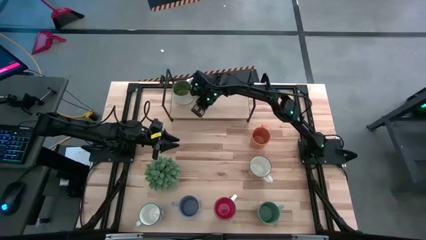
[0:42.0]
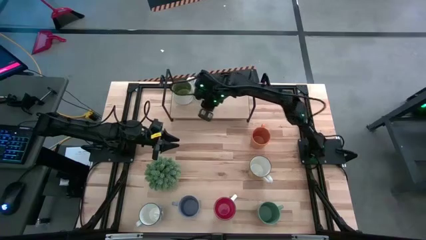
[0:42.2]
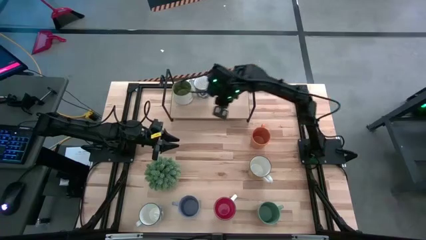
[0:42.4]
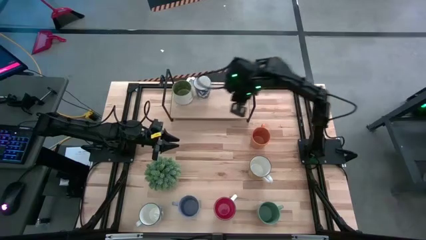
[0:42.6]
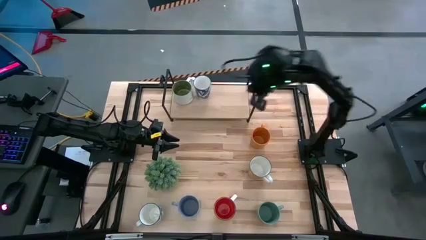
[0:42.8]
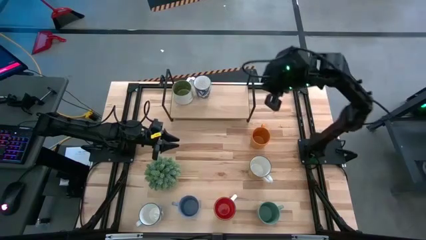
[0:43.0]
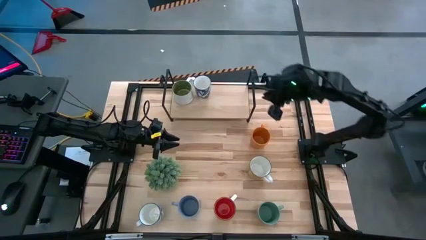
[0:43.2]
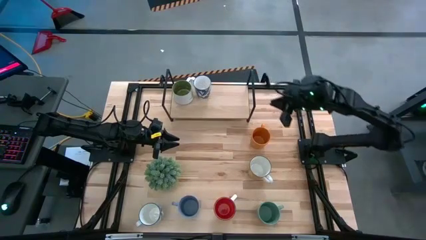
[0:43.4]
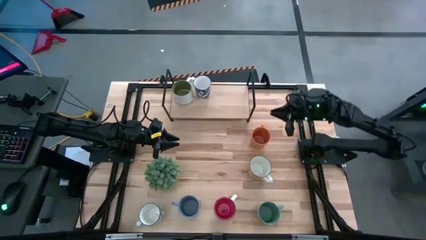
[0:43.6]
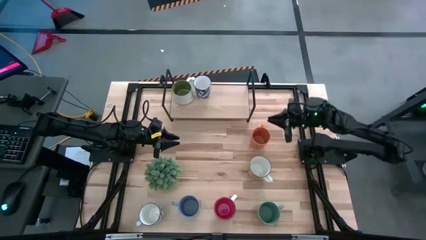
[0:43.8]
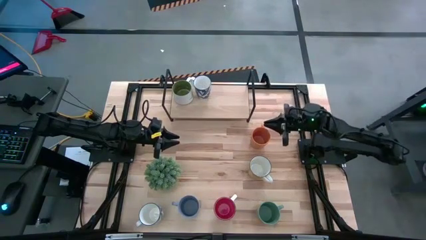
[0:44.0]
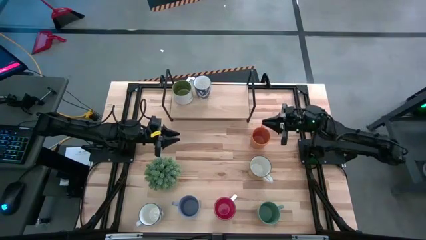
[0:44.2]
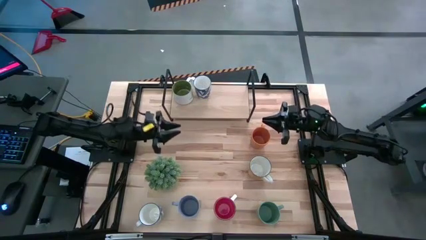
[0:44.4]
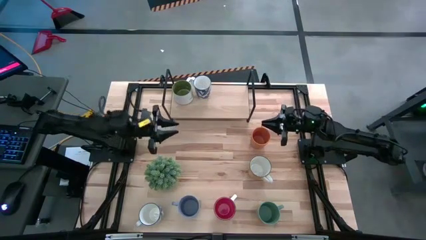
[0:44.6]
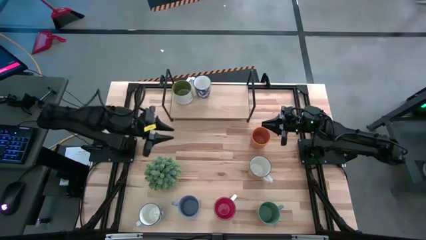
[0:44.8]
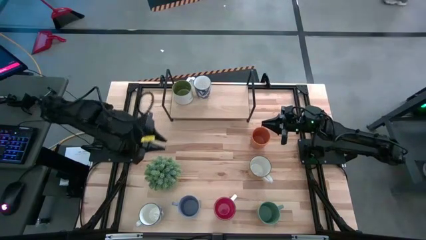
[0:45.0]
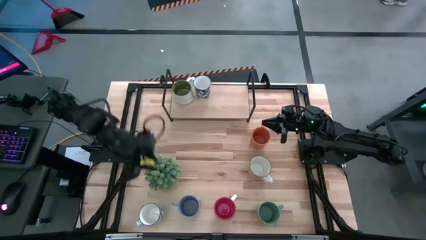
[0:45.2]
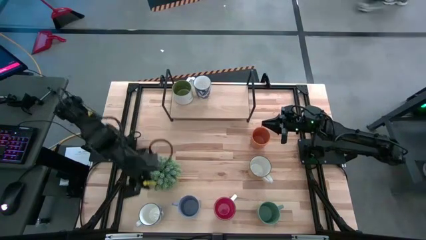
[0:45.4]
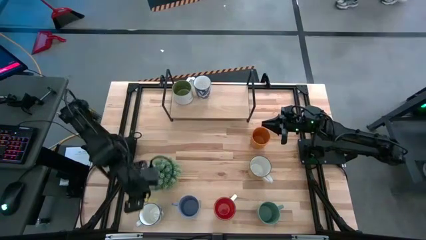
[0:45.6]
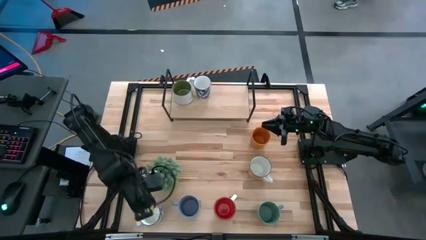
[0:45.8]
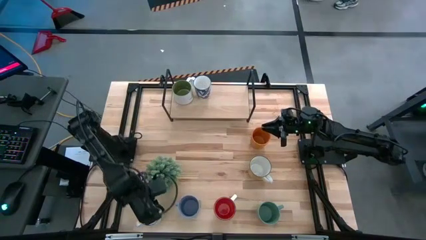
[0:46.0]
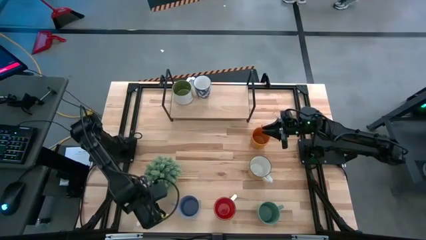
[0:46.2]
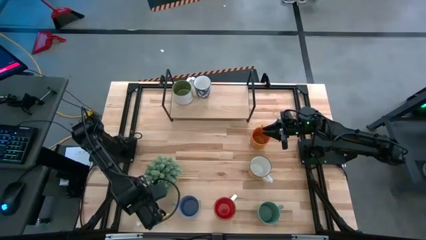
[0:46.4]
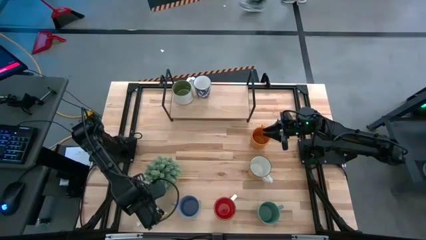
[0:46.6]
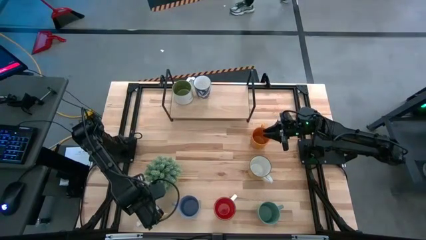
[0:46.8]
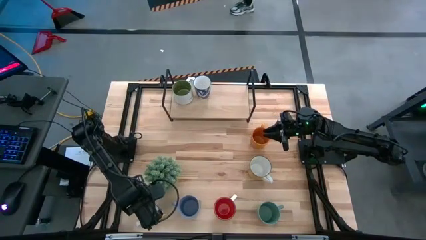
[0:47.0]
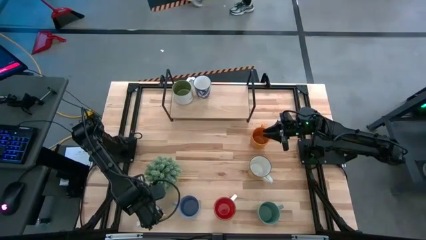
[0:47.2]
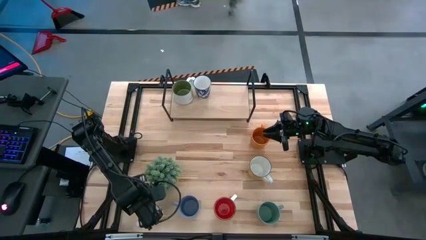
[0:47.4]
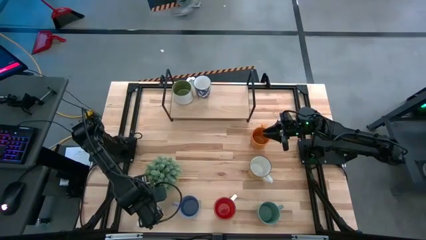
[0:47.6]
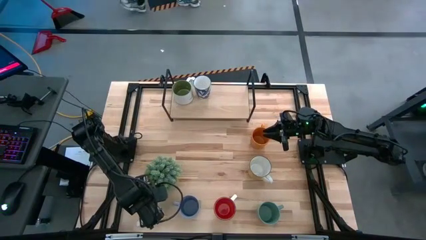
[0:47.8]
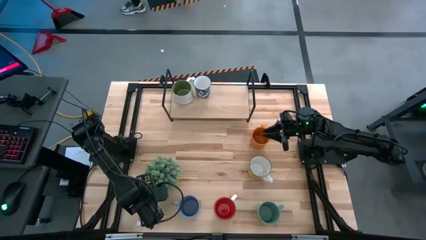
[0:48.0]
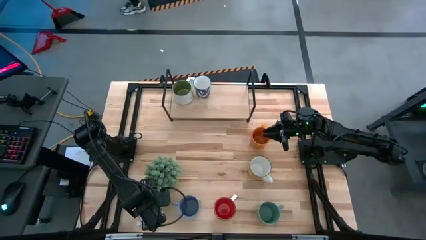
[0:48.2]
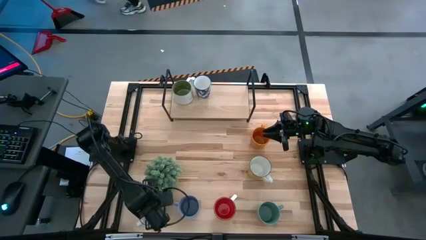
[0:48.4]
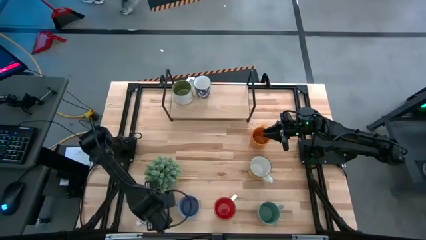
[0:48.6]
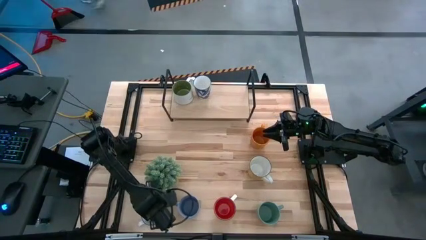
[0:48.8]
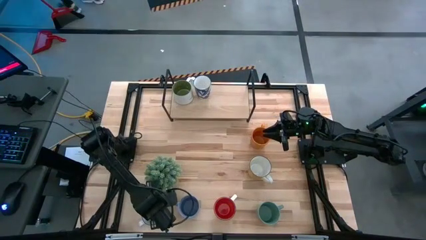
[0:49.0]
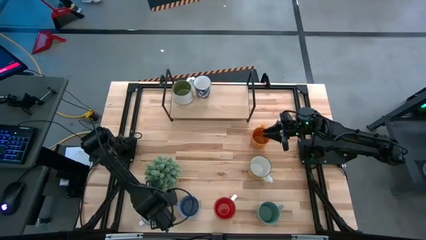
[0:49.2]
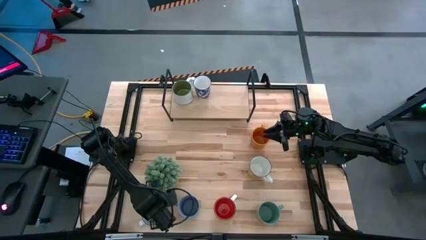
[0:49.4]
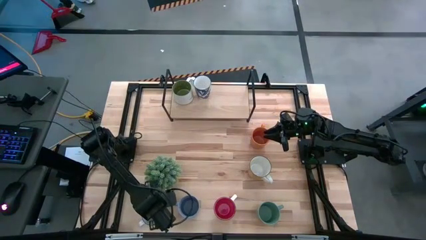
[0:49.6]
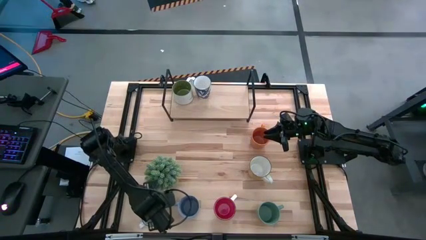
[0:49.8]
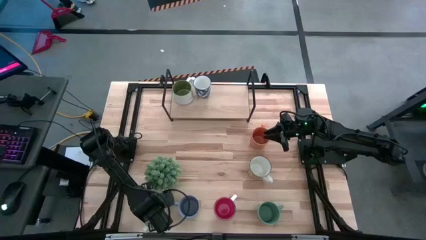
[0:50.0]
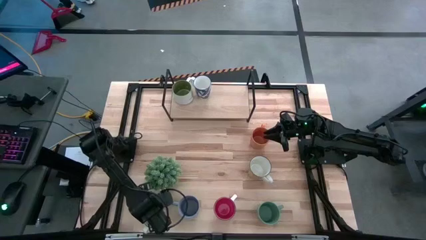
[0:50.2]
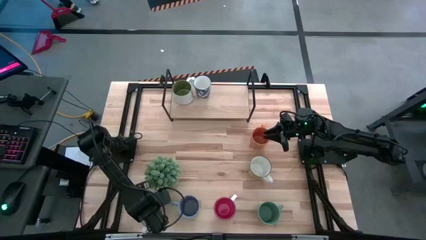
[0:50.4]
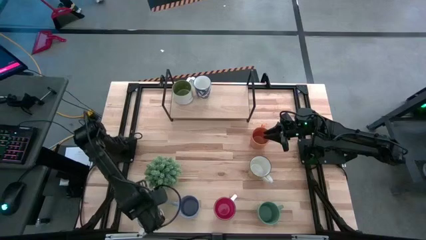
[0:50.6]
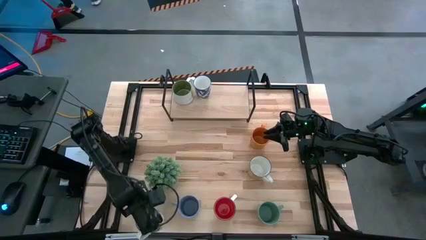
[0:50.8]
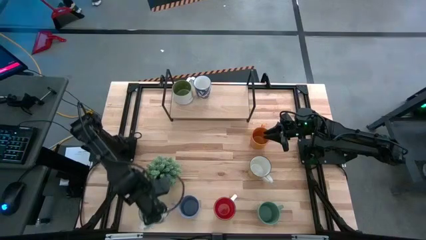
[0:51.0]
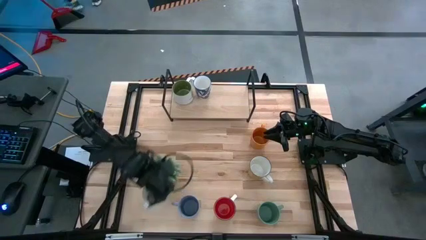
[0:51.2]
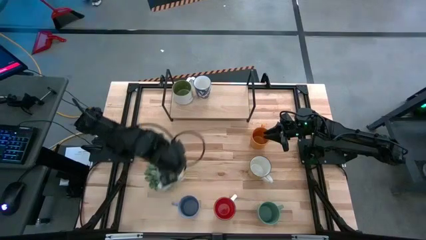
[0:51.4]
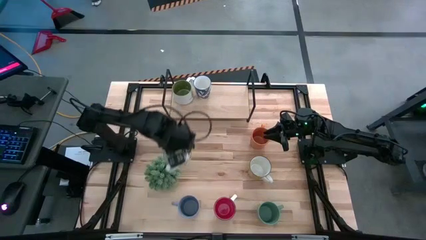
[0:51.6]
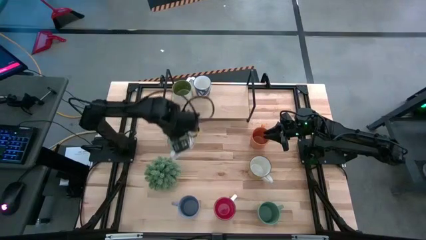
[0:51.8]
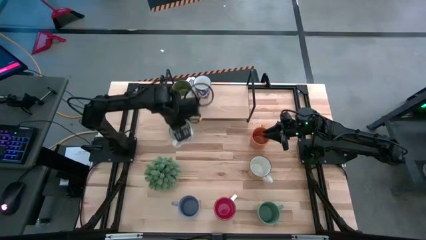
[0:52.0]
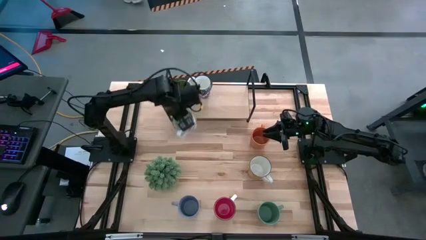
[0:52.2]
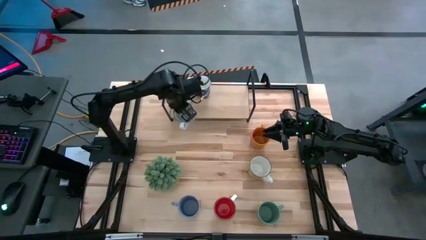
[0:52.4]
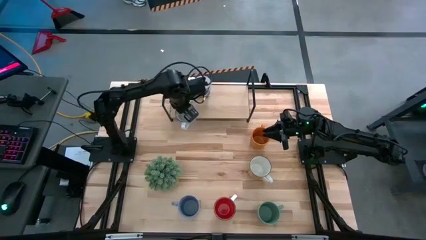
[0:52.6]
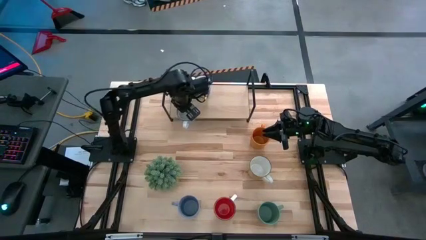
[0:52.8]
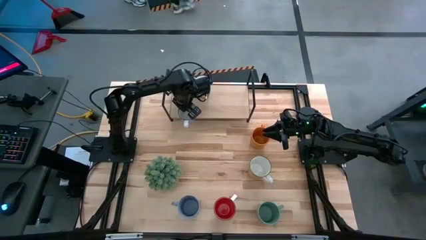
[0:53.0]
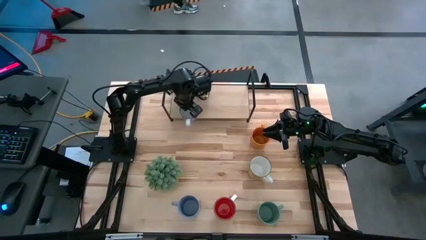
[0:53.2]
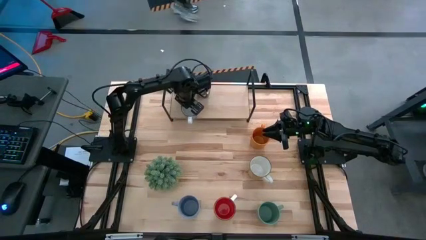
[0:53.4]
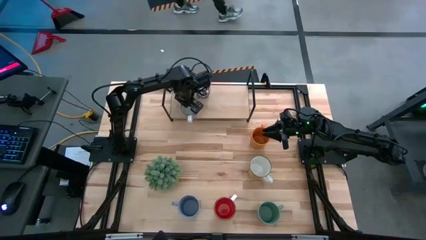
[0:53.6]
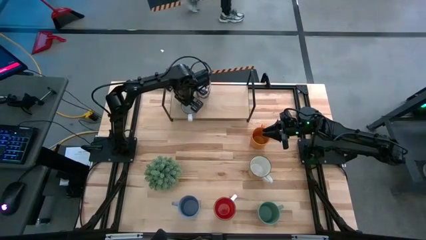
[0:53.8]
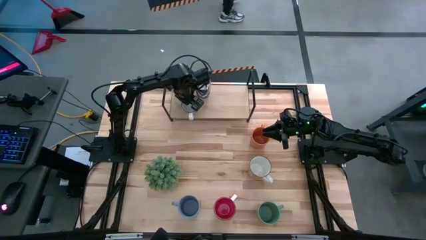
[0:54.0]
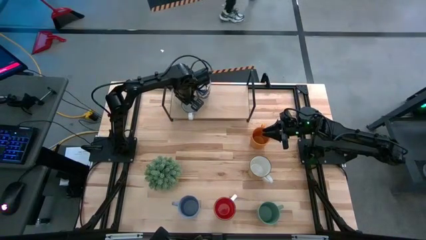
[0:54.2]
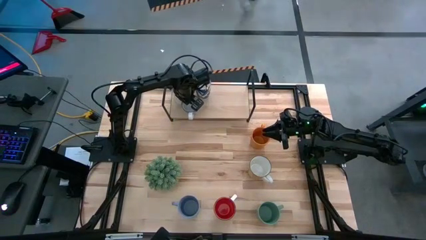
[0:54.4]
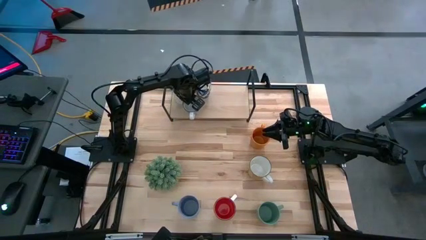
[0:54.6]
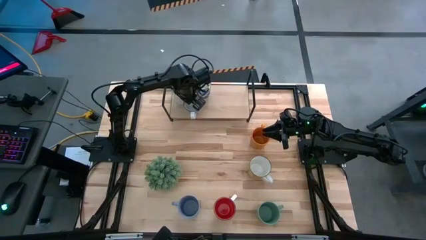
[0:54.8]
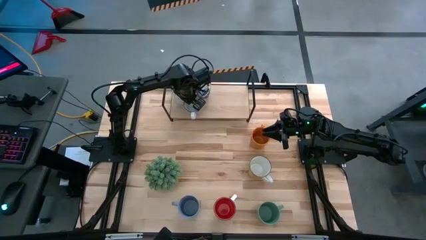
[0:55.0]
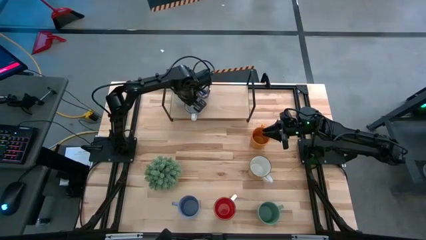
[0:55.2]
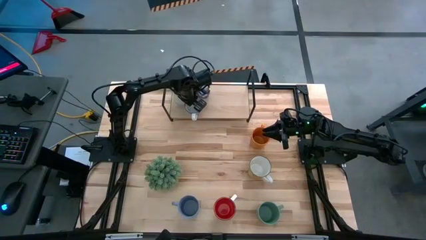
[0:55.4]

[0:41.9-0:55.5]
Task: Place coffee mugs
Put the blue mug on the shelf aligned with the other white mug
